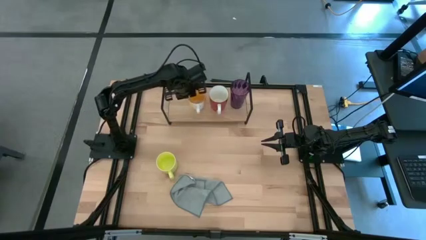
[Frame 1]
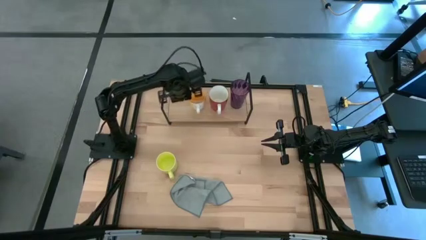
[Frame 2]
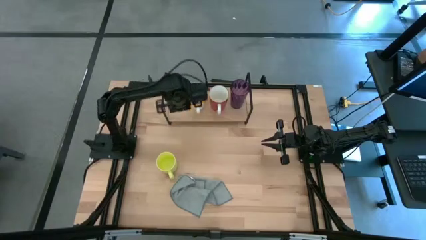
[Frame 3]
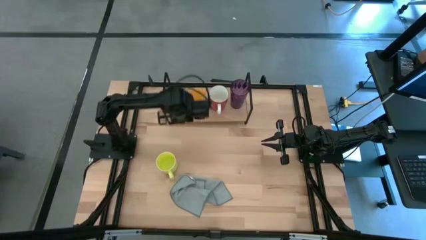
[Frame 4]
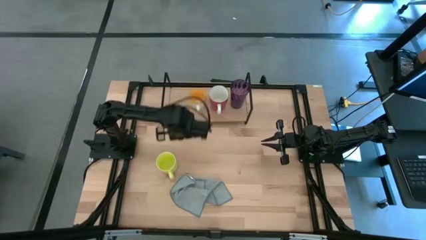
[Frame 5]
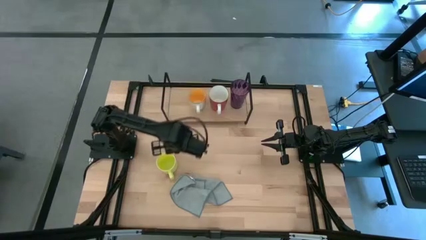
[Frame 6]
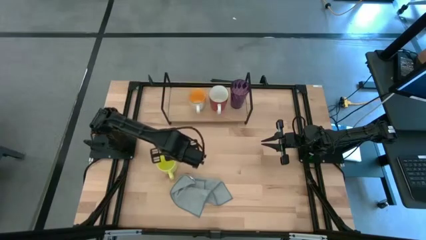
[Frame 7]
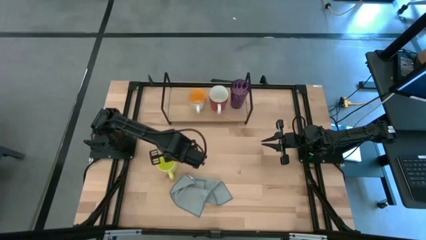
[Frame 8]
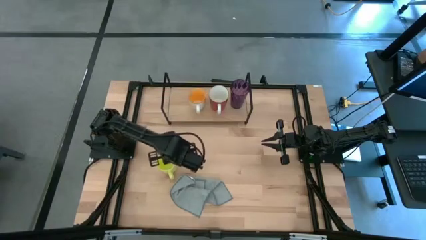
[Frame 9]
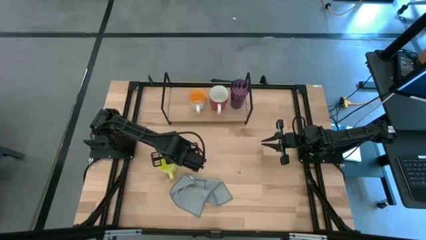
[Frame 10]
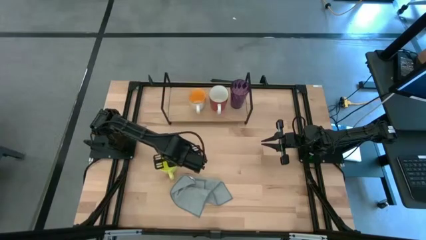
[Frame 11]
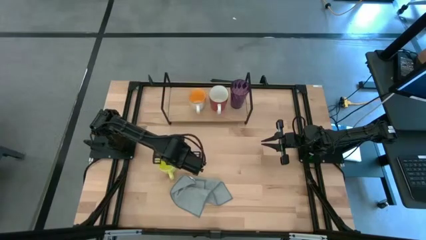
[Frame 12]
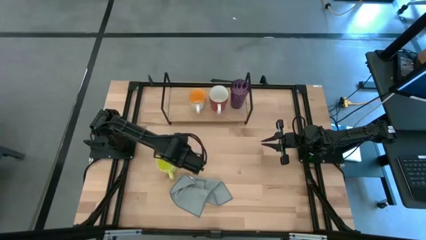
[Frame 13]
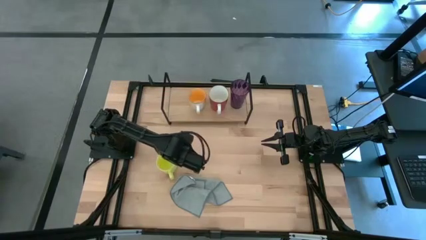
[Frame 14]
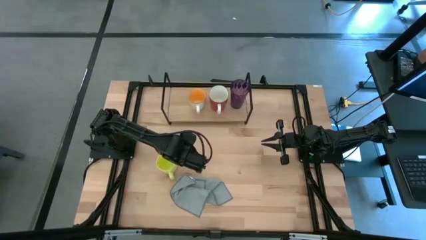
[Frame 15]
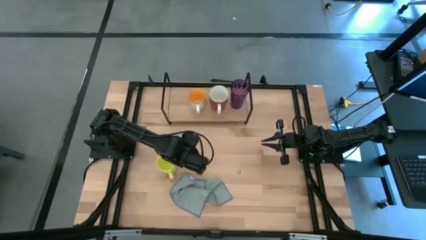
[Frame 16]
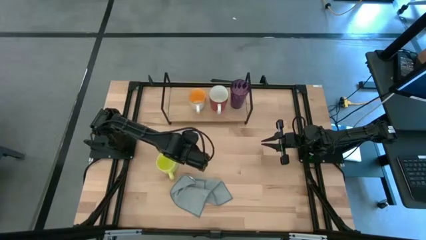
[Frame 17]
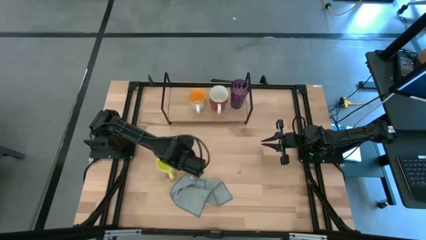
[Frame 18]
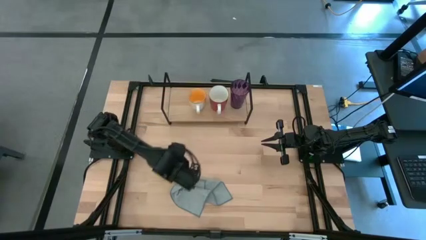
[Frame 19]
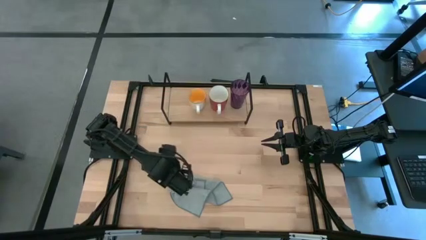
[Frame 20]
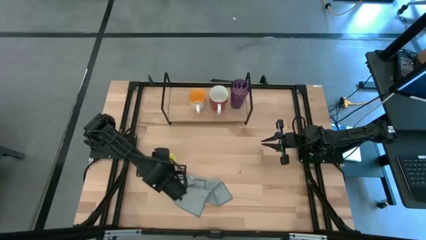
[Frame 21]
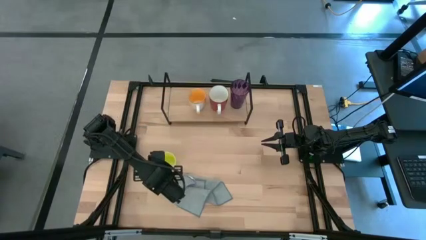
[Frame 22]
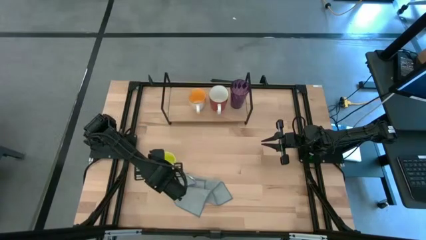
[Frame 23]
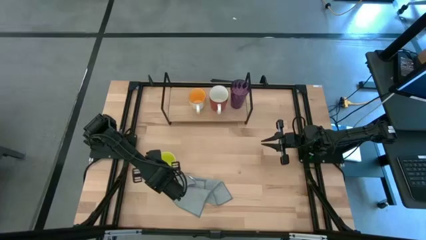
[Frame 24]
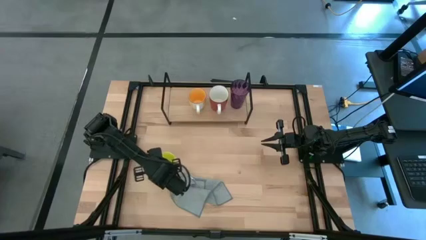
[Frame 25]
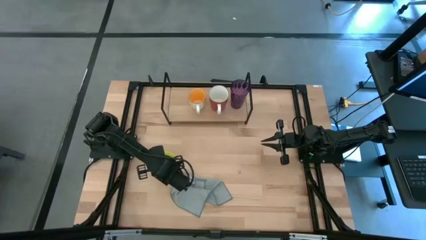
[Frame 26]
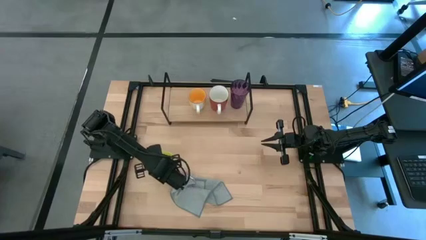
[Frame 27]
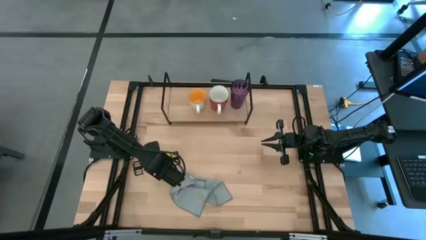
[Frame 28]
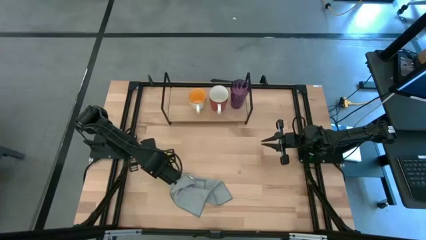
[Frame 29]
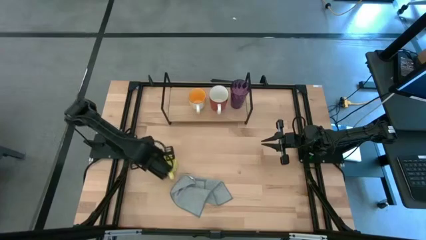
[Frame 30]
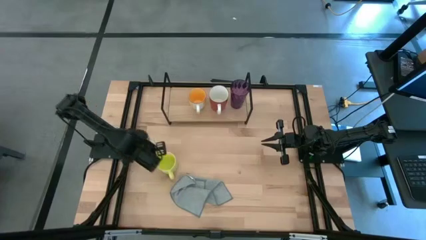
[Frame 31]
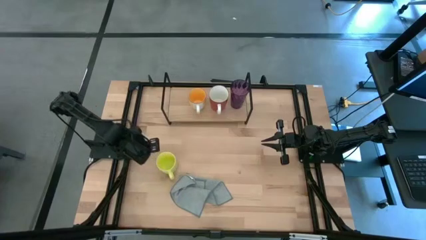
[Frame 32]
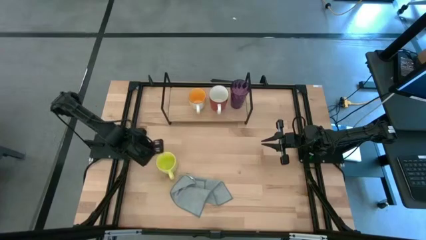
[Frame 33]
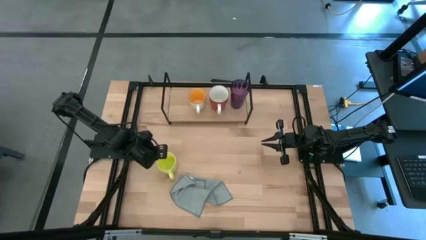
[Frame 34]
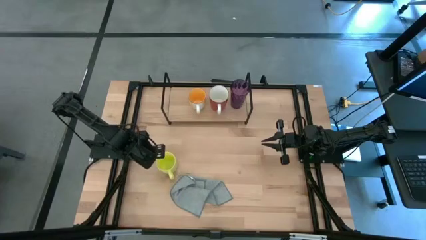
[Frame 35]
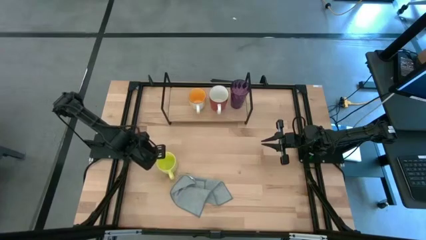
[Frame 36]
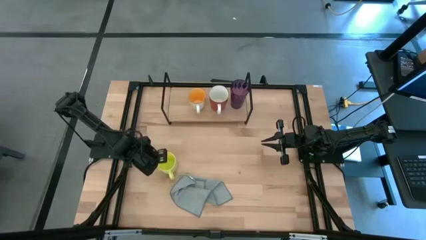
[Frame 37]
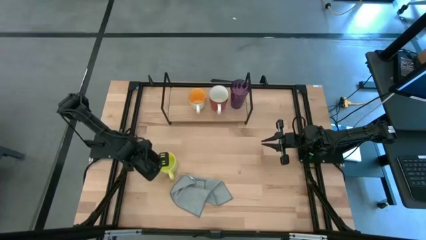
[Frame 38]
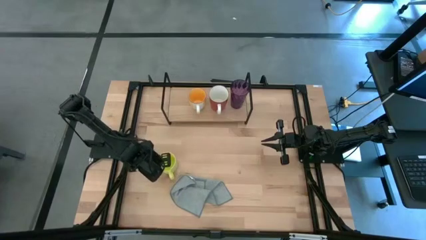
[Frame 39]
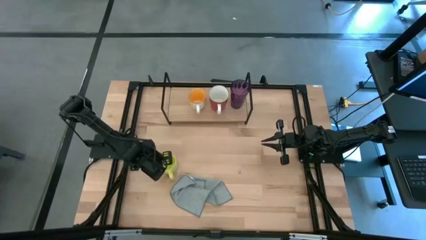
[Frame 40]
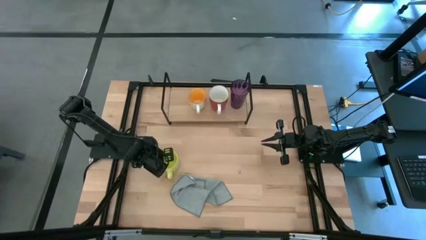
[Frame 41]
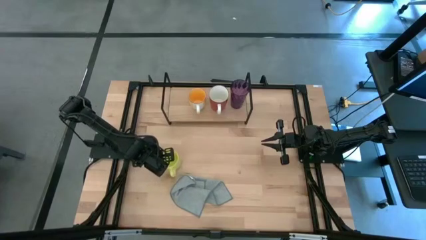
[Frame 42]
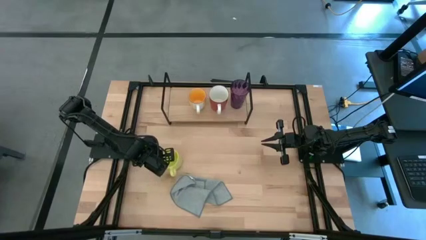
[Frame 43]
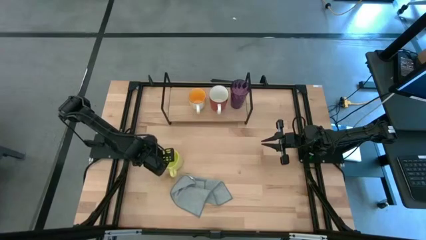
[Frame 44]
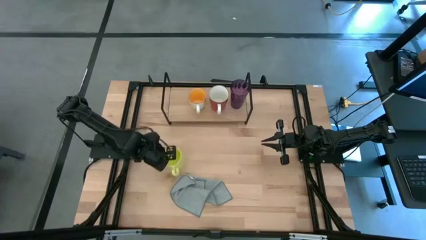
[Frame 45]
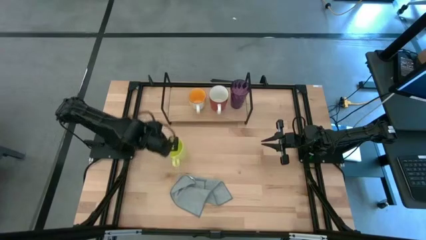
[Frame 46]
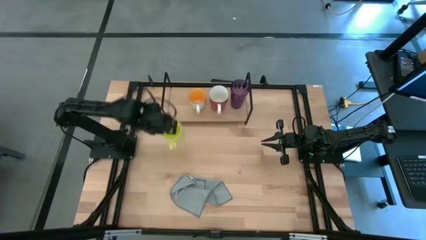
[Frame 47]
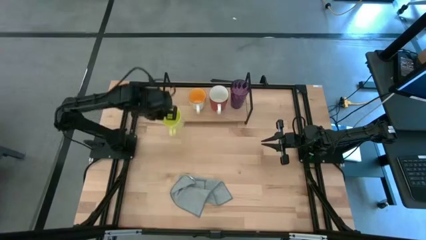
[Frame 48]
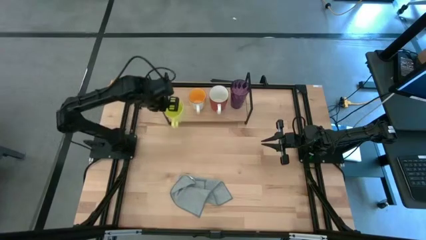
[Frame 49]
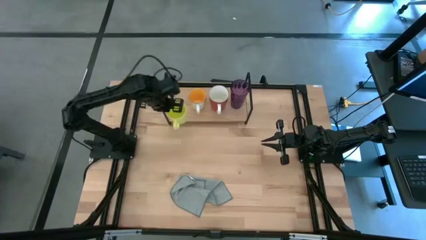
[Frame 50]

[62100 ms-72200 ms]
Task: Stack small to large cups/mugs on shelf
Put the yellow-green mug on the shelf

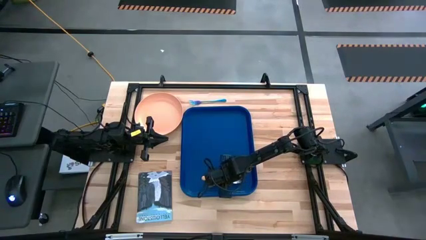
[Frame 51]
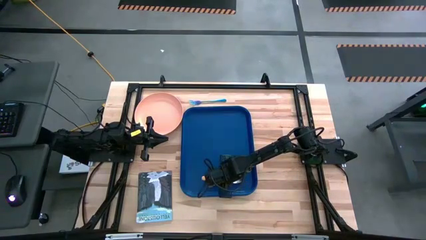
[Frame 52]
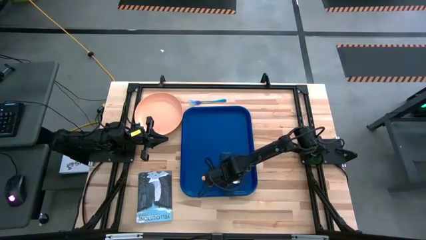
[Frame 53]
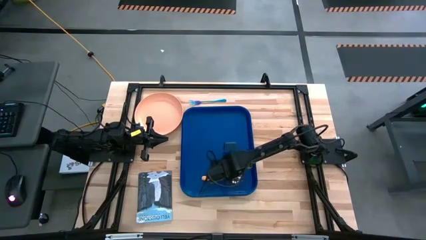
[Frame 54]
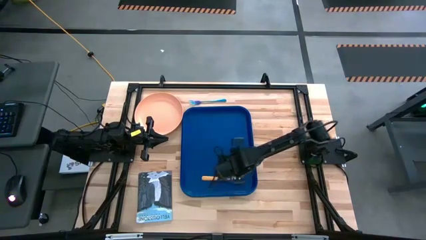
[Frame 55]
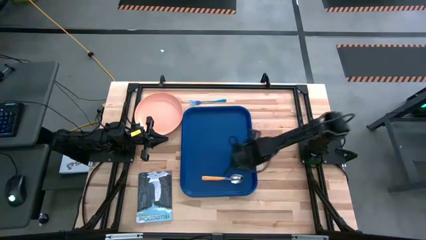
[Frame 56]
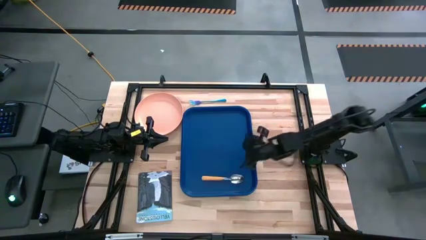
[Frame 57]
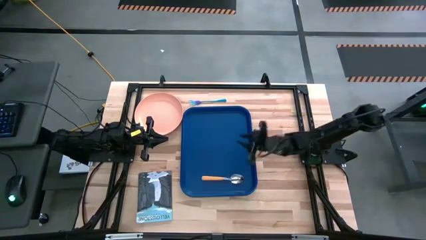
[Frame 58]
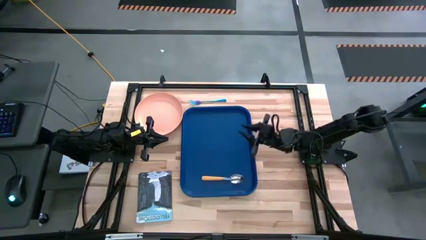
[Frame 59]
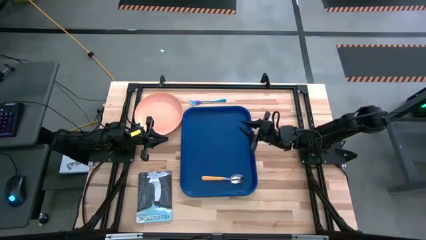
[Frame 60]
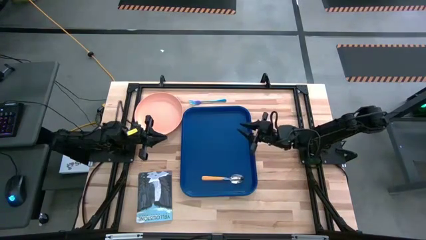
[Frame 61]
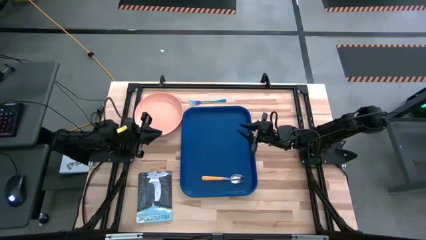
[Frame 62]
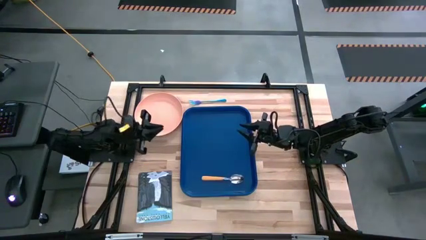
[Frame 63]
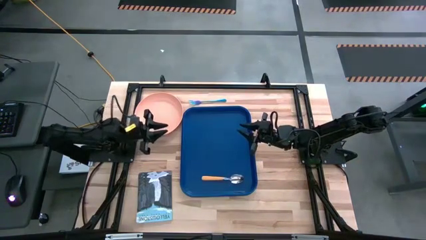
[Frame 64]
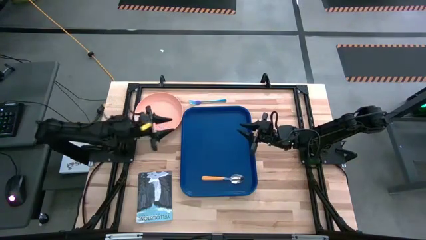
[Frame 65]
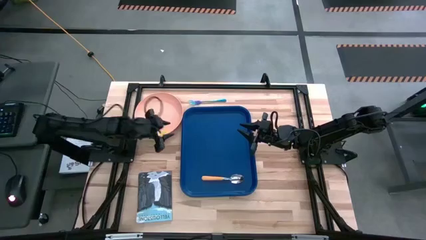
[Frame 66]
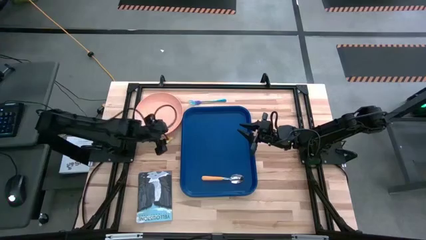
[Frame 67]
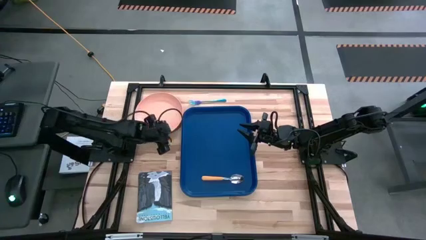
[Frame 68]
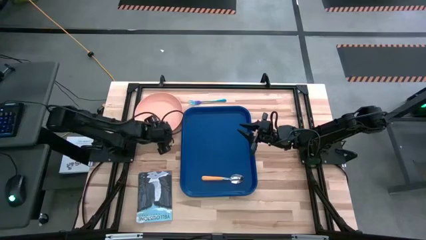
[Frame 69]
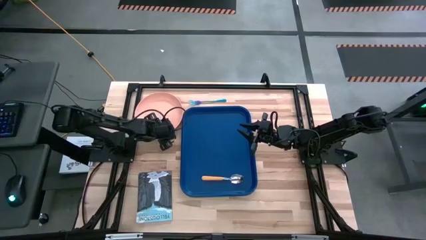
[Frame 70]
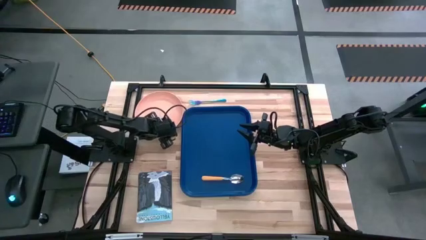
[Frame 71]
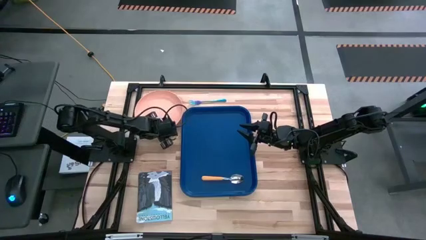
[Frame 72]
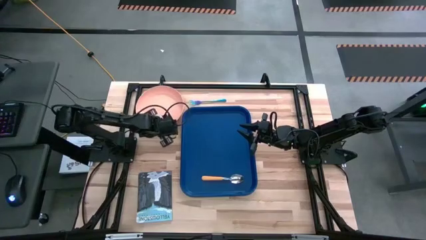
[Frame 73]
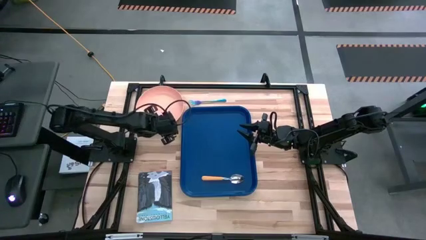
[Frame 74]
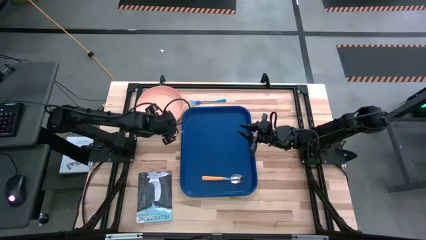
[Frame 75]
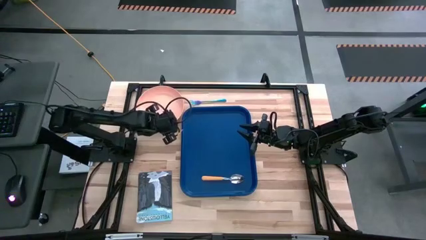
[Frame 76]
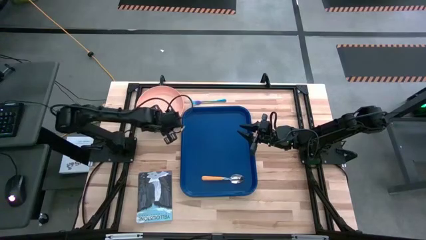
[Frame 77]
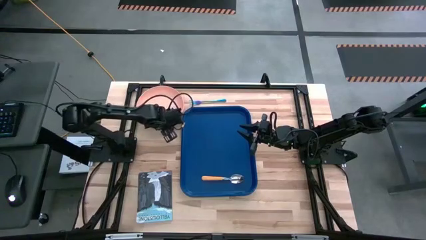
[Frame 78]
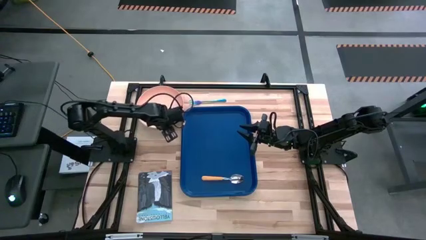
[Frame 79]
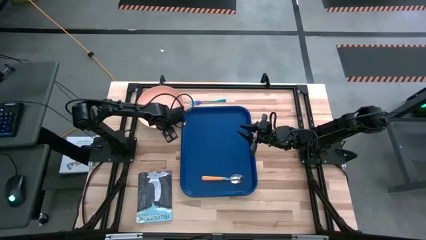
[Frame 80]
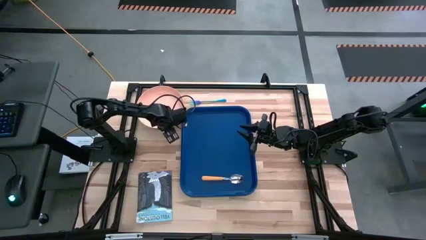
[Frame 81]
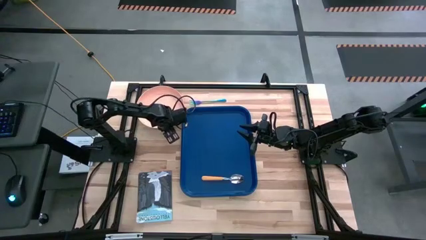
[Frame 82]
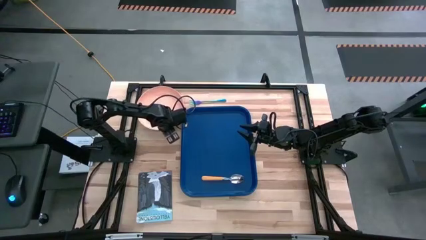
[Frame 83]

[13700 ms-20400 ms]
Task: Pick and place plate/cup/fork/spoon on tray
Put the light orange plate on the blue serving tray
